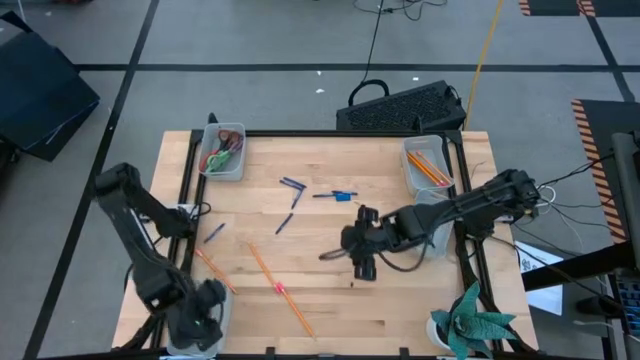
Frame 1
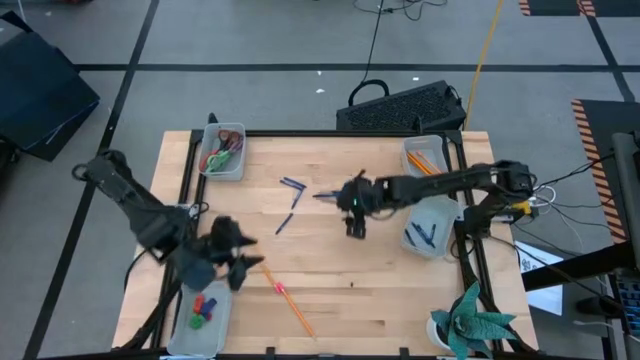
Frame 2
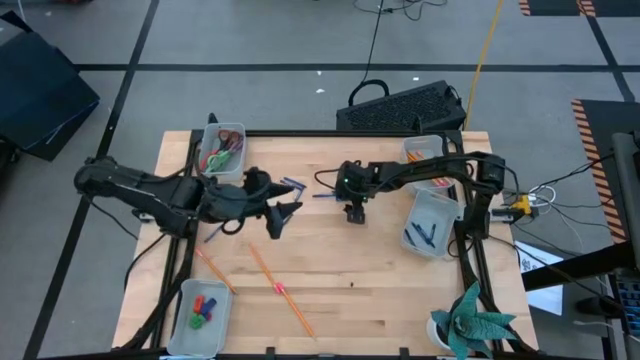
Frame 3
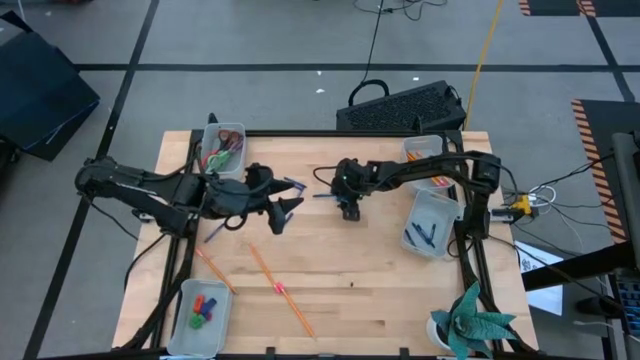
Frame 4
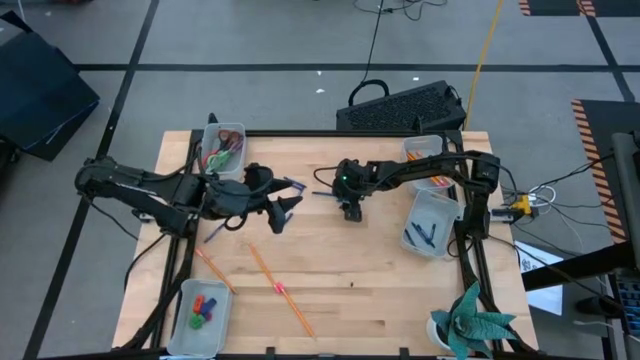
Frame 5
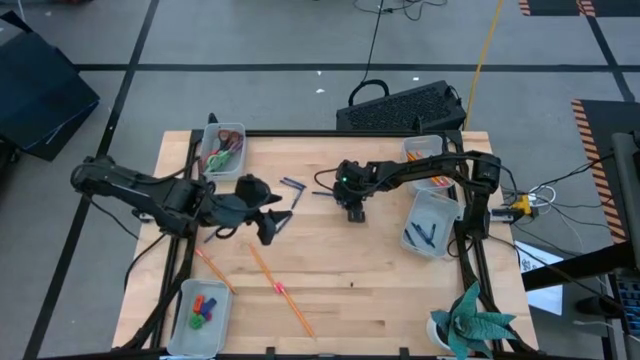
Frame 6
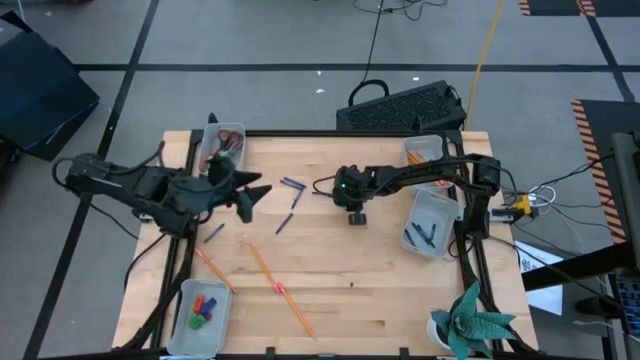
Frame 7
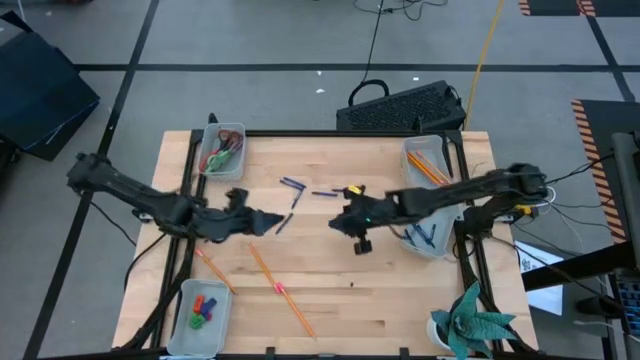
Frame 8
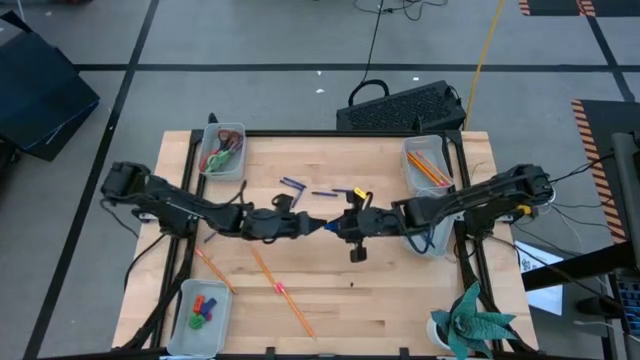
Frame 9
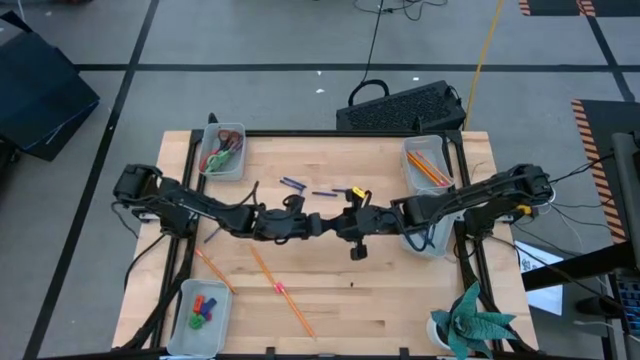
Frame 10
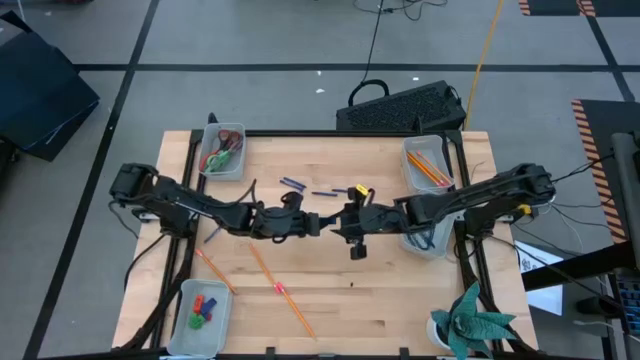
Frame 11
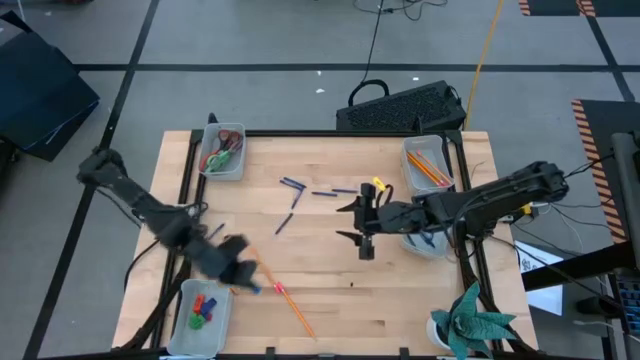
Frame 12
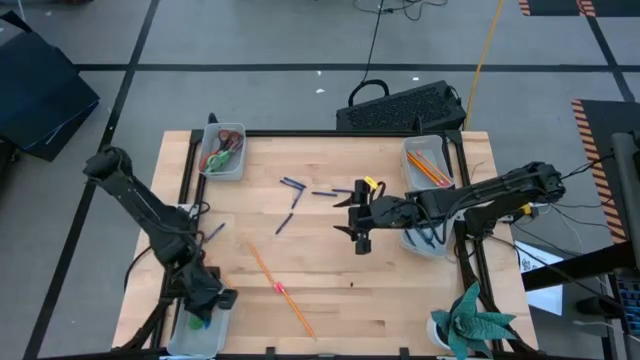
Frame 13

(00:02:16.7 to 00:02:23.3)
Task: Sort crayons/erasers/pens/pencils in bins
Put the blue eraser into the bottom left gray bin

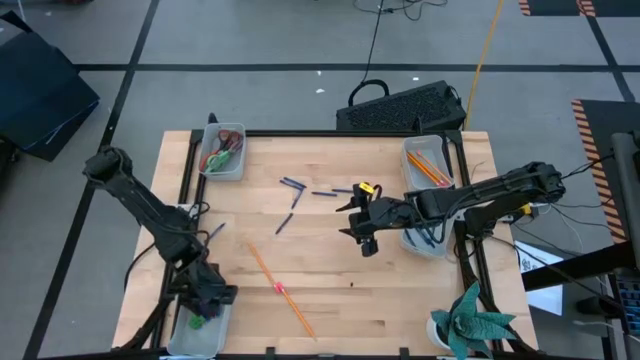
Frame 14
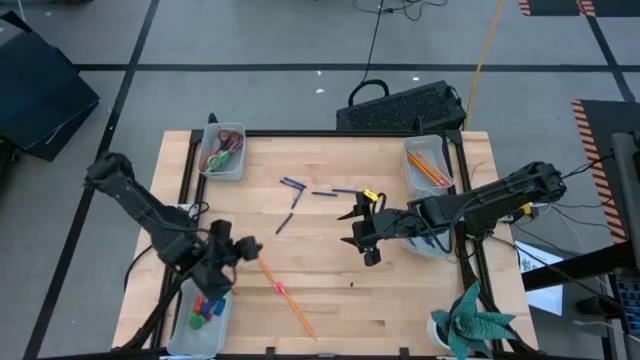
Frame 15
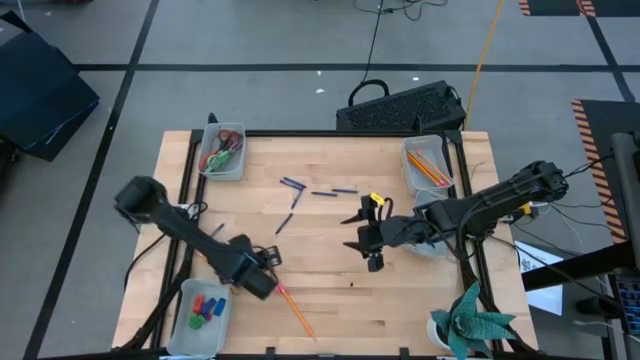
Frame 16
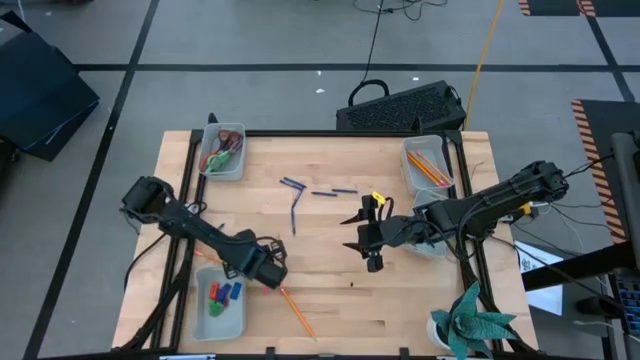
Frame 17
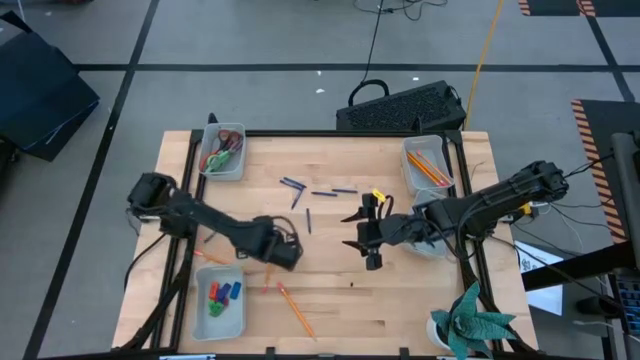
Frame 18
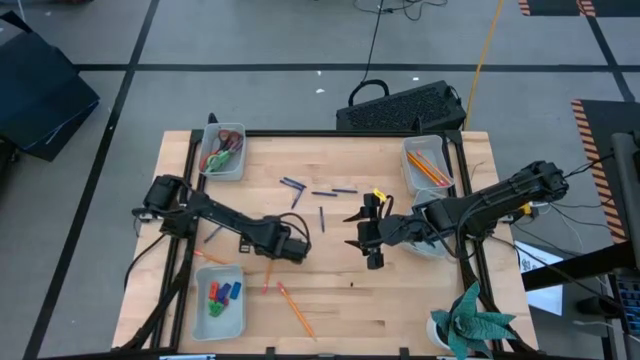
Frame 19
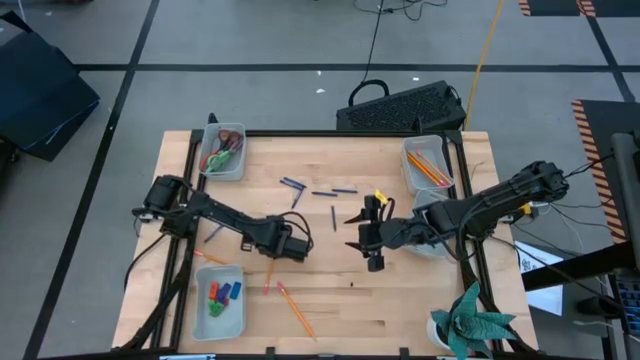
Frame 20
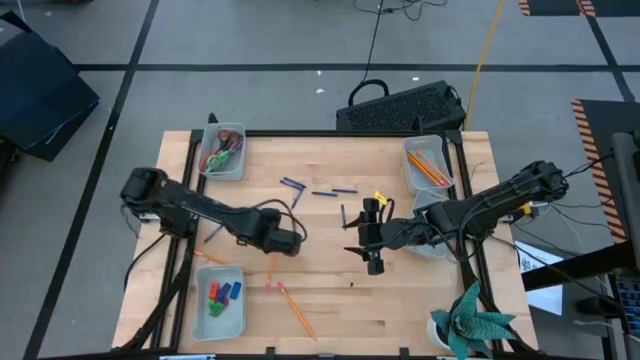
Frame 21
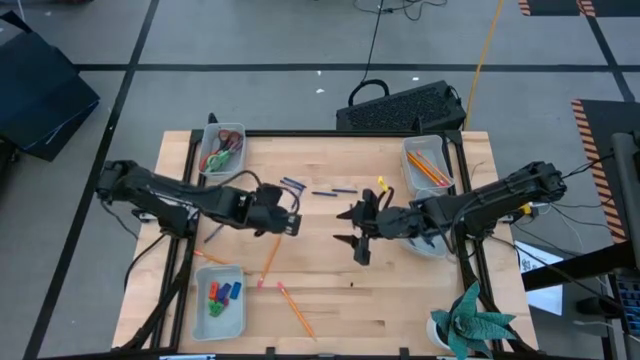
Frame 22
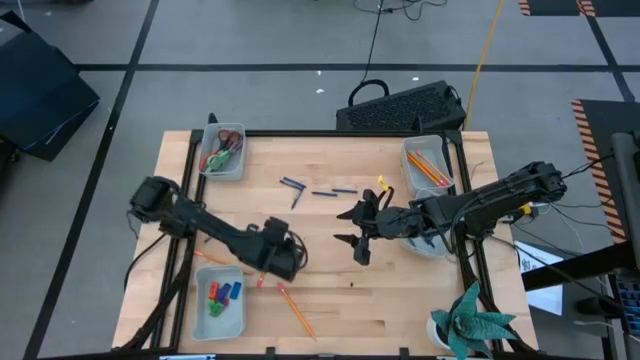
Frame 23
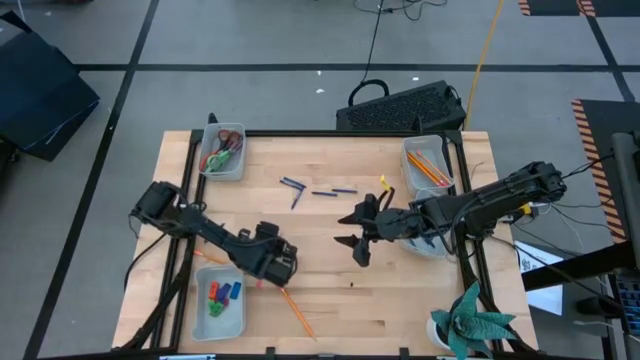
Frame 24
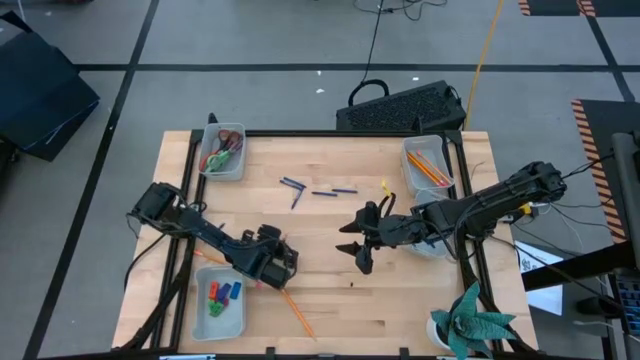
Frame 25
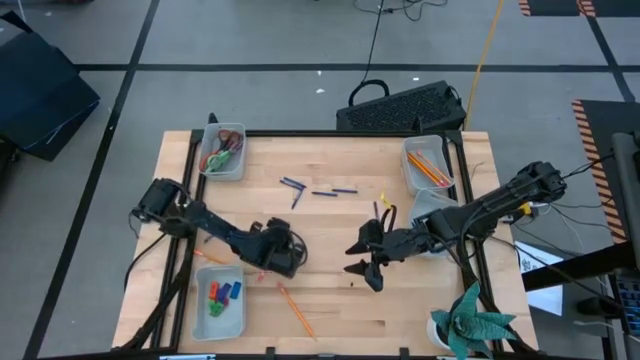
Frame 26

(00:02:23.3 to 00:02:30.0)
Put the orange pencil into the top right gray bin

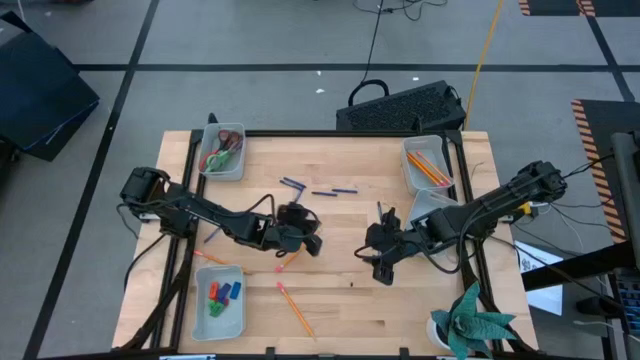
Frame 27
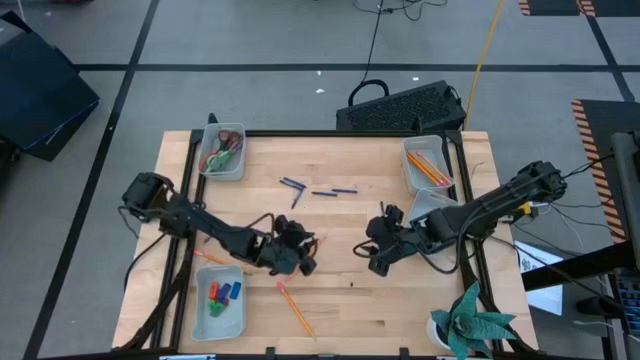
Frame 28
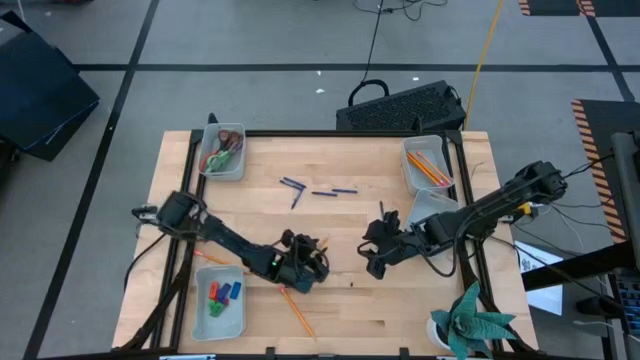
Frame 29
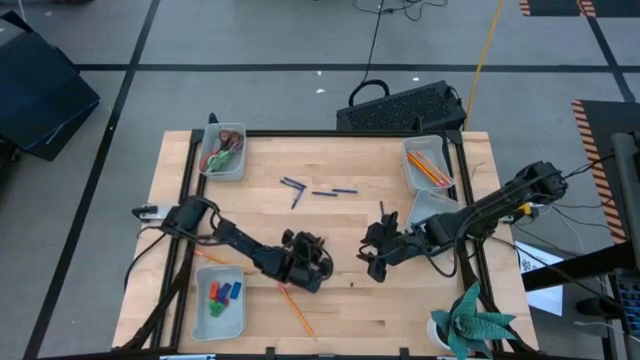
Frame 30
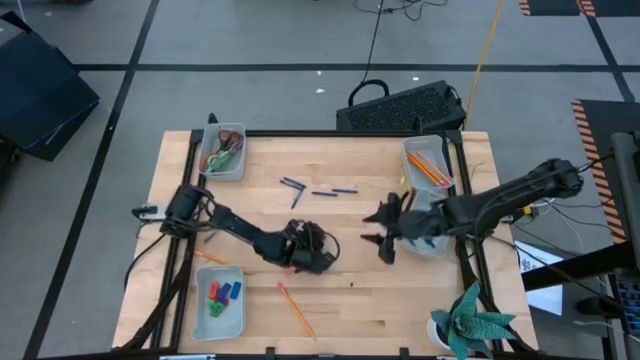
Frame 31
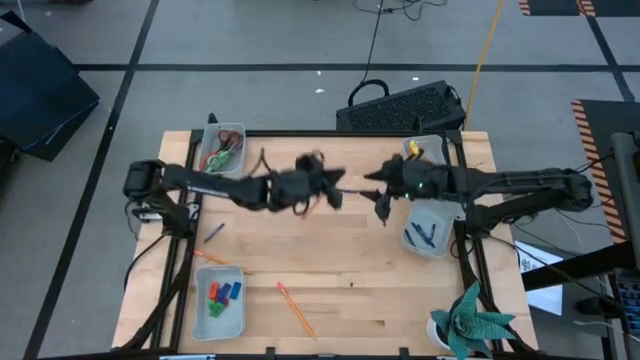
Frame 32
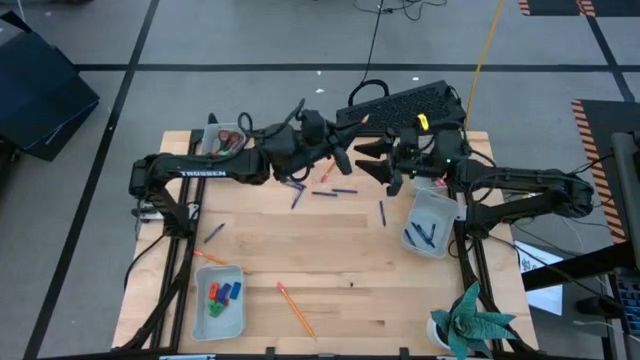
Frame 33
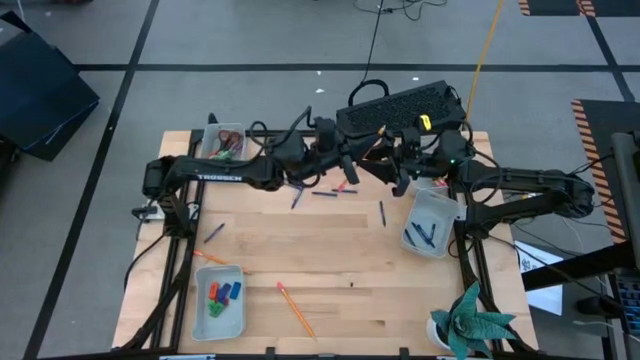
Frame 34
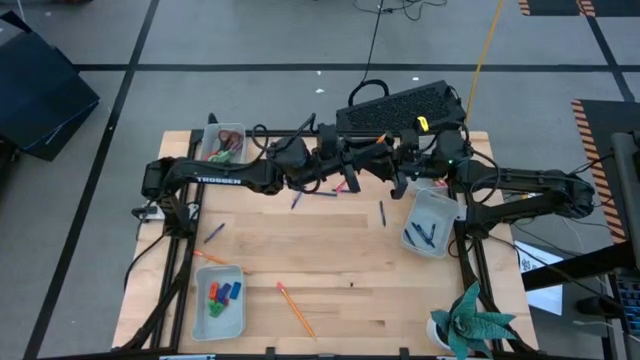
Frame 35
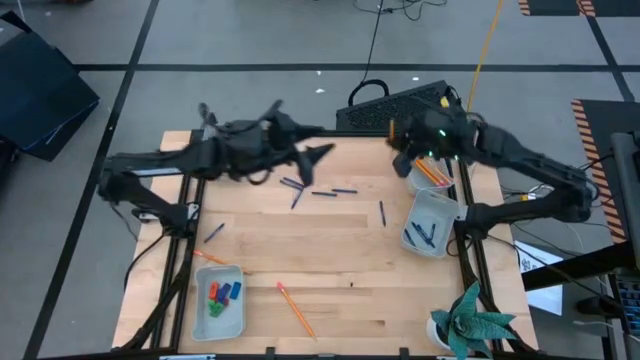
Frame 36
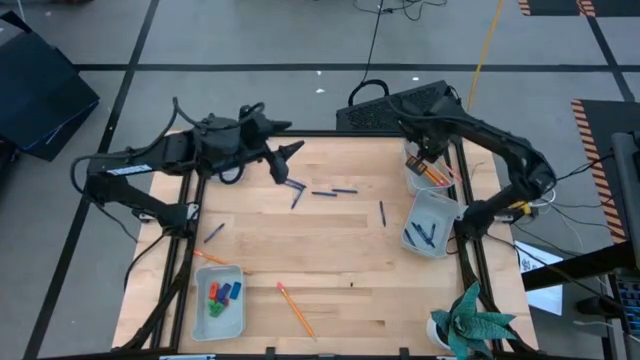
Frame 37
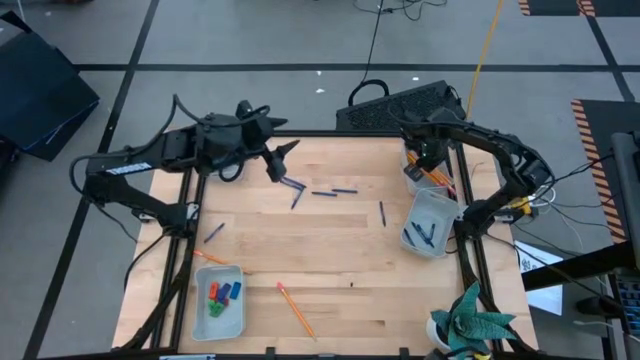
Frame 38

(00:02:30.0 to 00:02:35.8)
Put the orange pencil into the top right gray bin

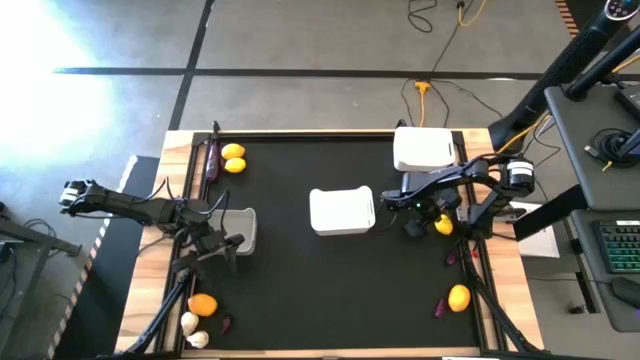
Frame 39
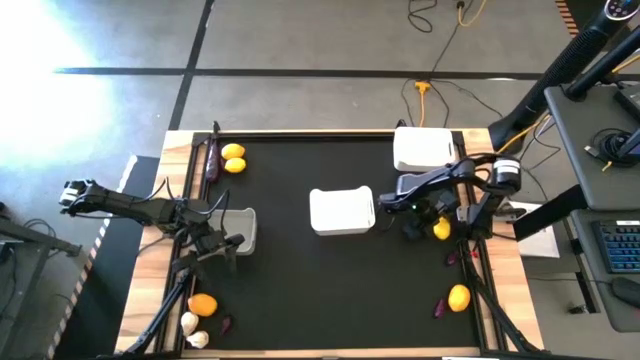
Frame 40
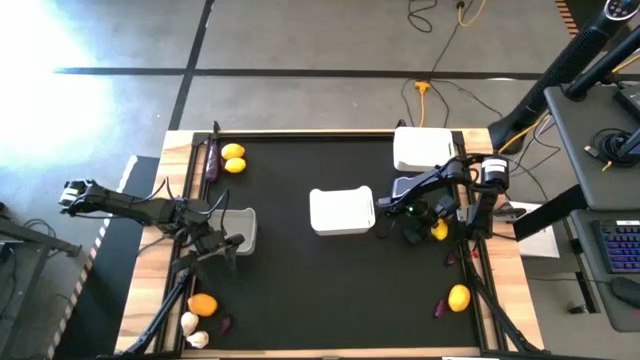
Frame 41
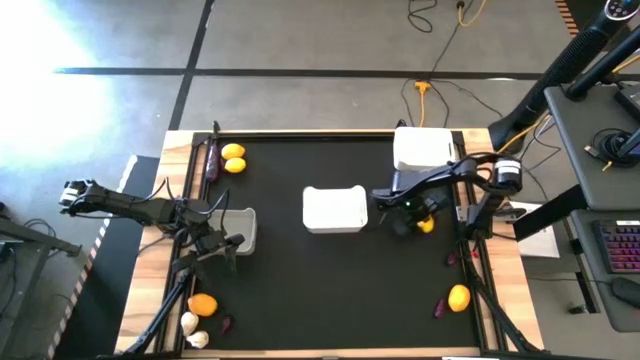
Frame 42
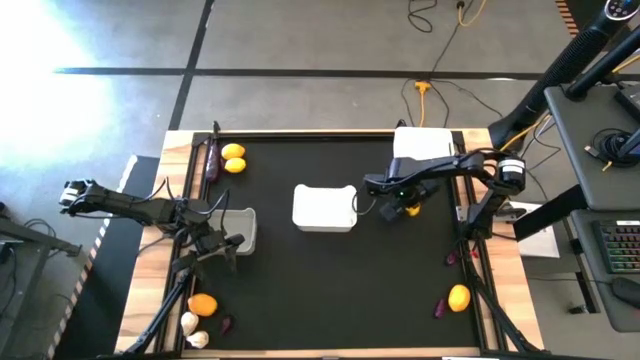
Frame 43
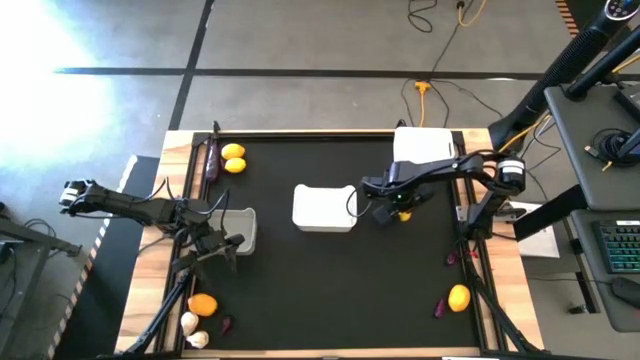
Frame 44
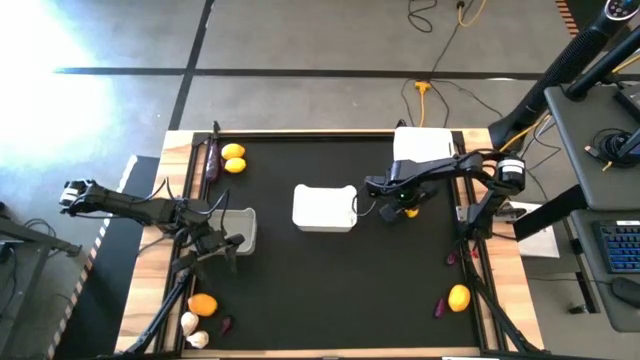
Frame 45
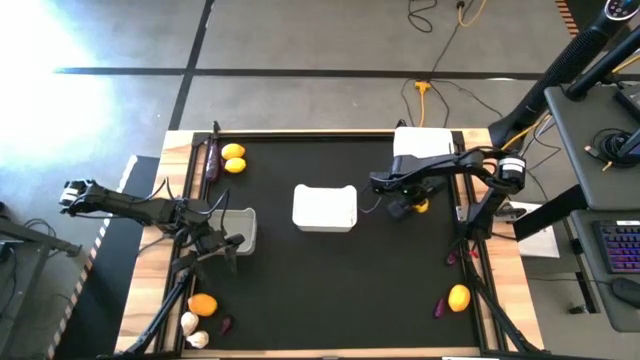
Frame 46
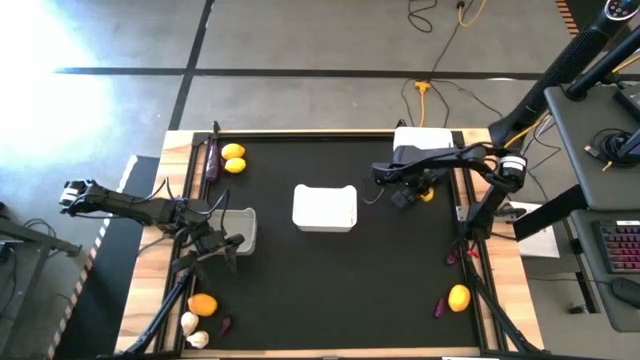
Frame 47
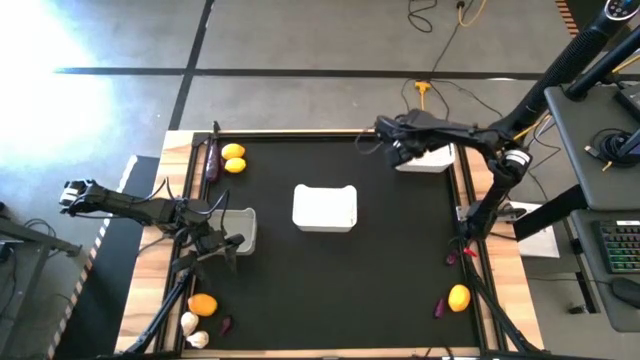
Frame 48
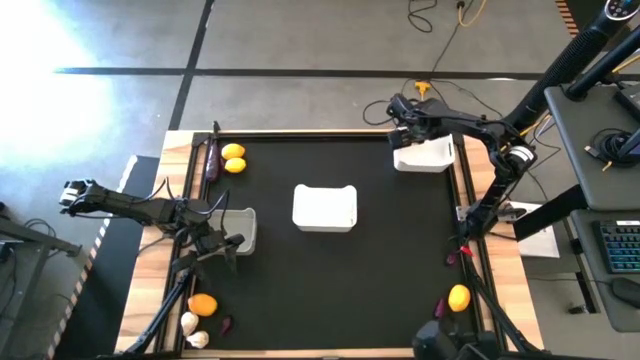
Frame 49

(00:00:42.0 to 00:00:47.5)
Task: Sort produce into baskets
Put the yellow lemon into the top white bin
